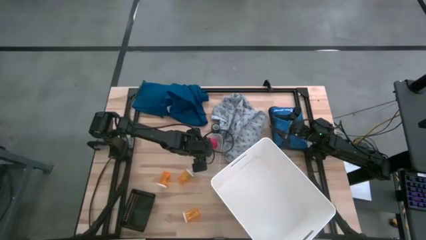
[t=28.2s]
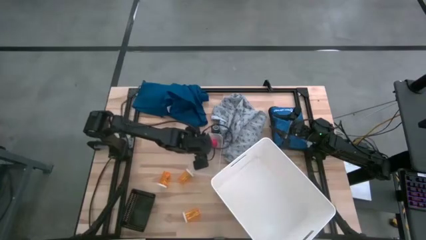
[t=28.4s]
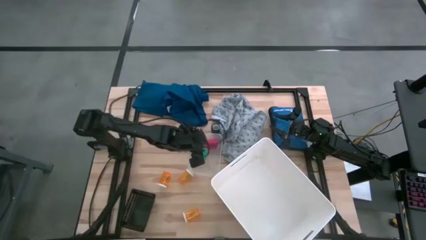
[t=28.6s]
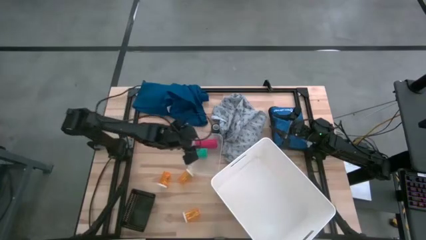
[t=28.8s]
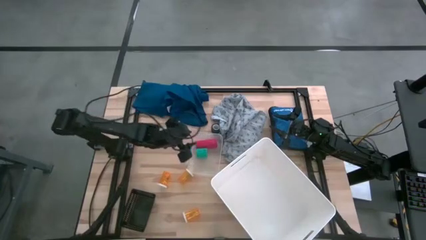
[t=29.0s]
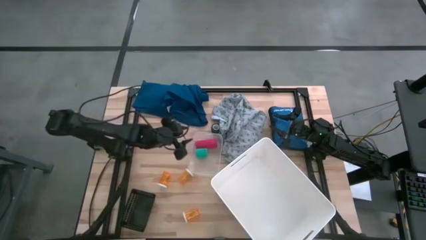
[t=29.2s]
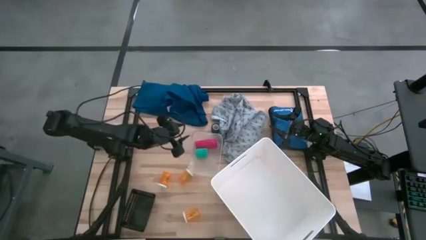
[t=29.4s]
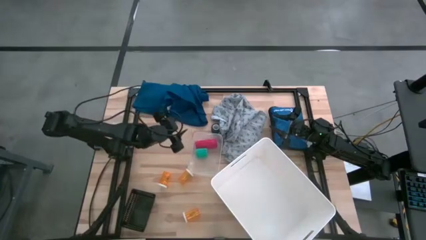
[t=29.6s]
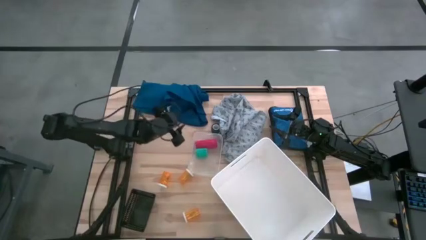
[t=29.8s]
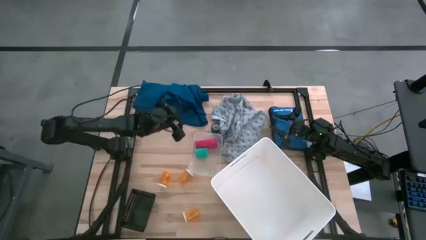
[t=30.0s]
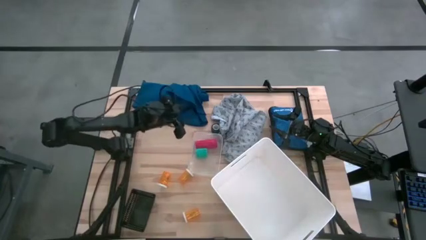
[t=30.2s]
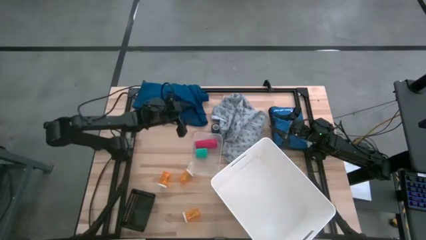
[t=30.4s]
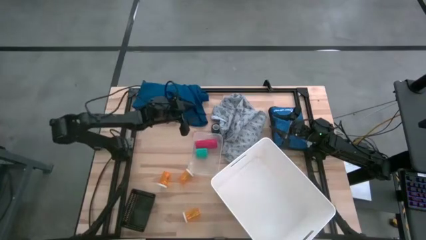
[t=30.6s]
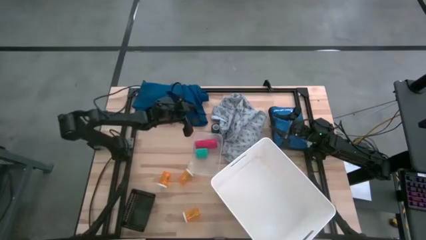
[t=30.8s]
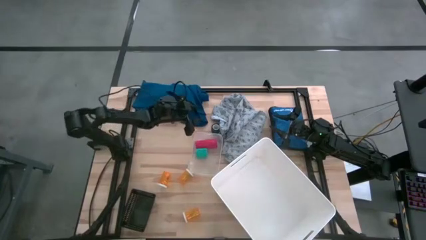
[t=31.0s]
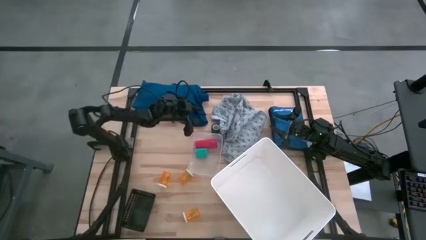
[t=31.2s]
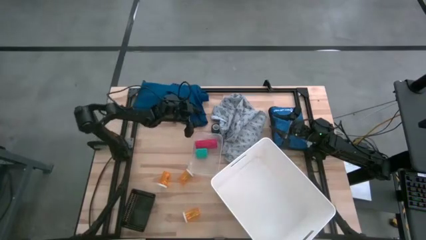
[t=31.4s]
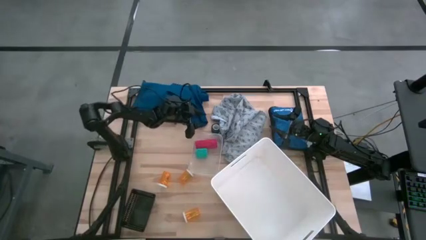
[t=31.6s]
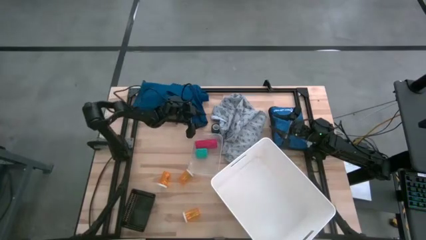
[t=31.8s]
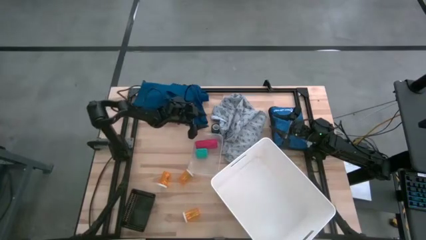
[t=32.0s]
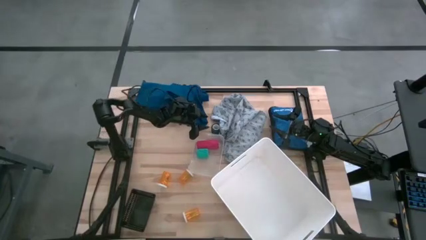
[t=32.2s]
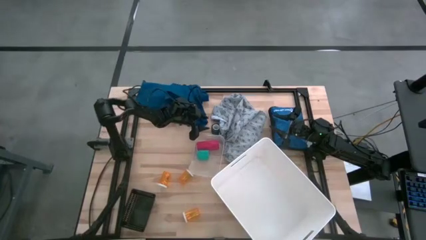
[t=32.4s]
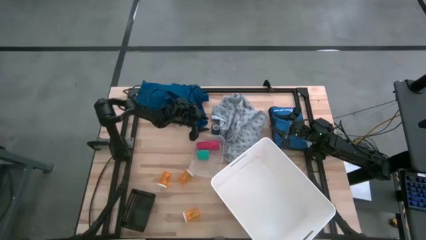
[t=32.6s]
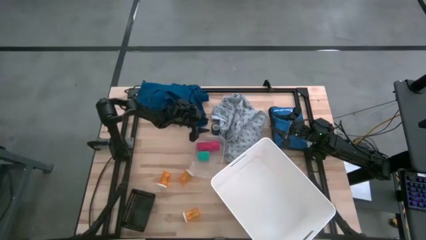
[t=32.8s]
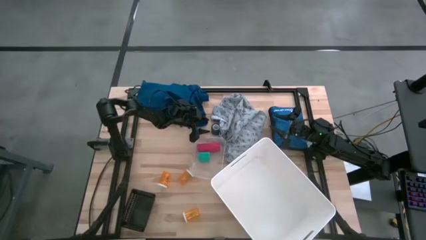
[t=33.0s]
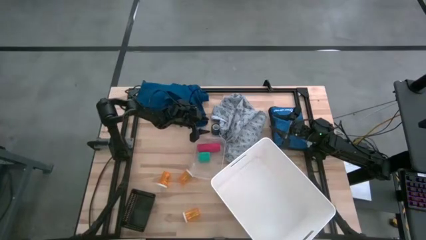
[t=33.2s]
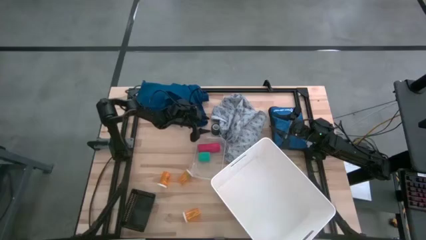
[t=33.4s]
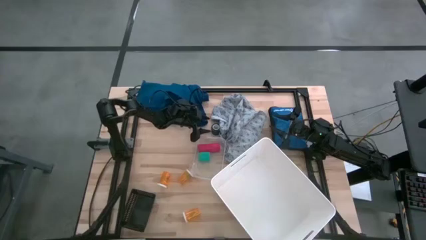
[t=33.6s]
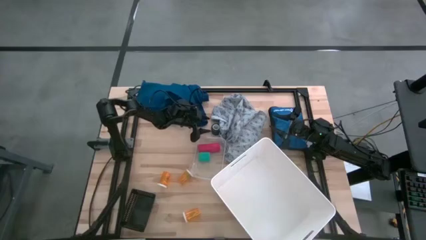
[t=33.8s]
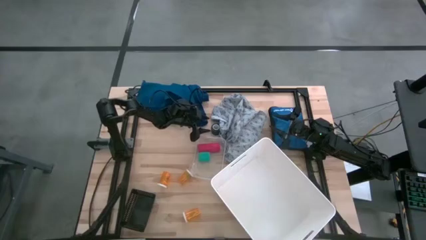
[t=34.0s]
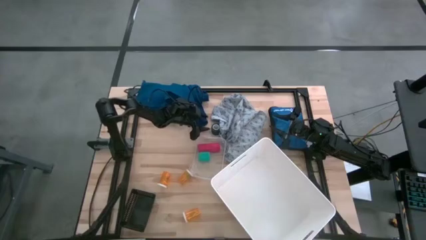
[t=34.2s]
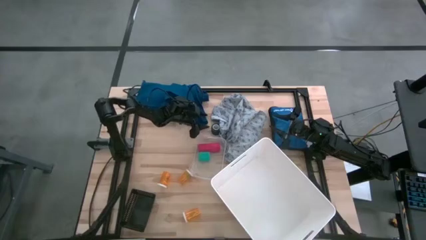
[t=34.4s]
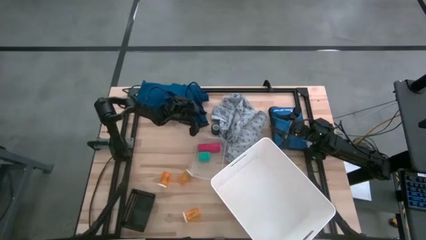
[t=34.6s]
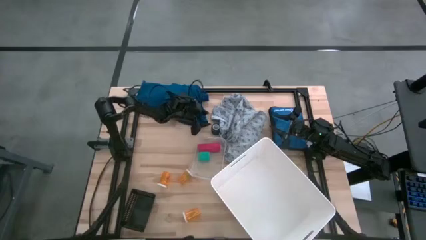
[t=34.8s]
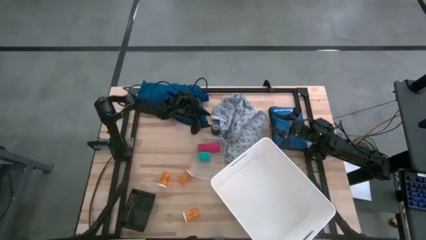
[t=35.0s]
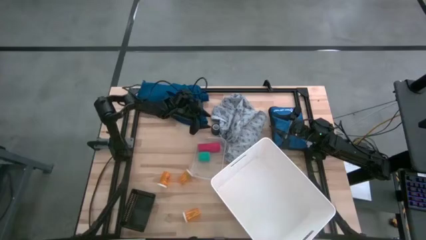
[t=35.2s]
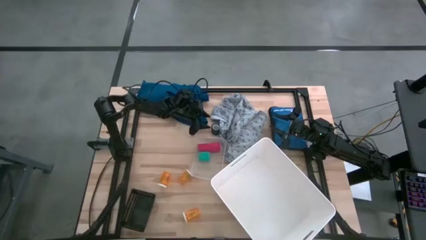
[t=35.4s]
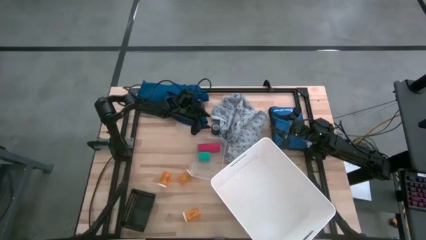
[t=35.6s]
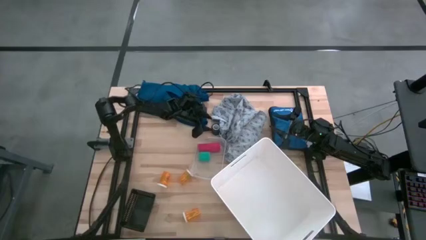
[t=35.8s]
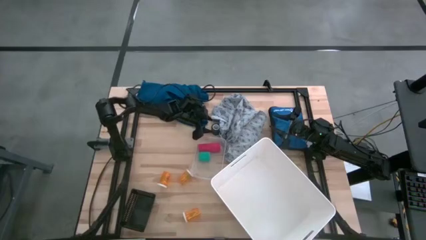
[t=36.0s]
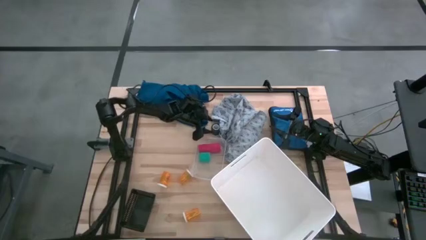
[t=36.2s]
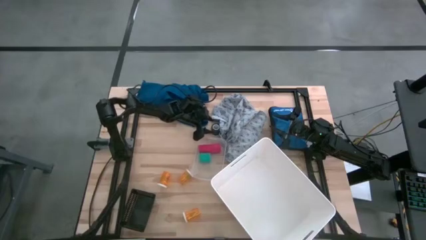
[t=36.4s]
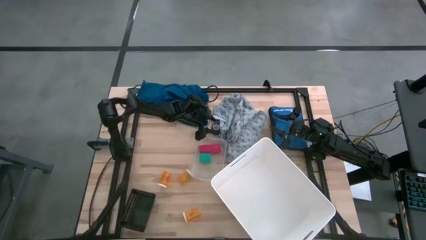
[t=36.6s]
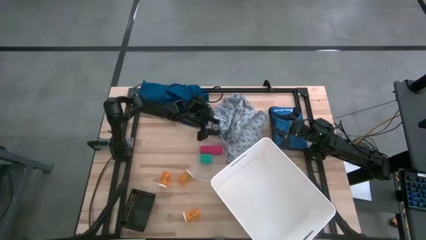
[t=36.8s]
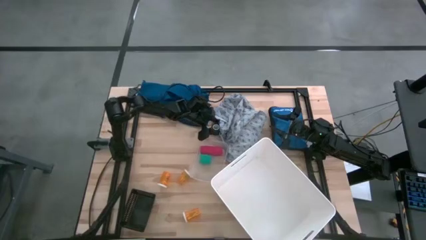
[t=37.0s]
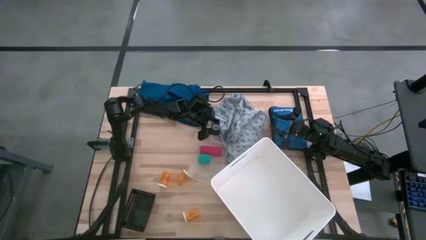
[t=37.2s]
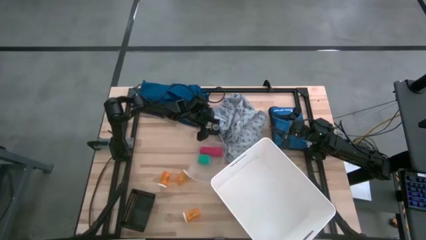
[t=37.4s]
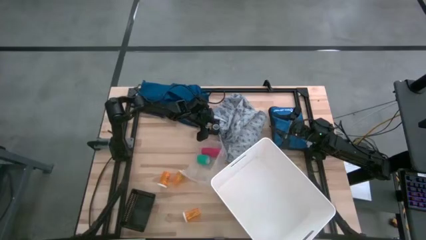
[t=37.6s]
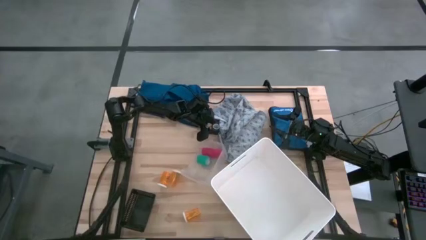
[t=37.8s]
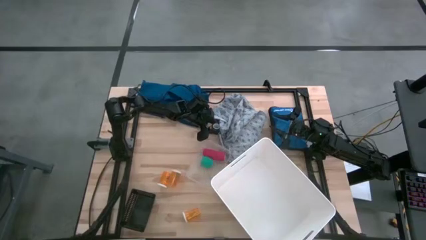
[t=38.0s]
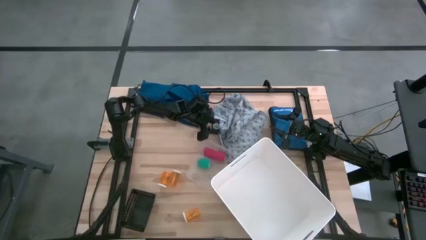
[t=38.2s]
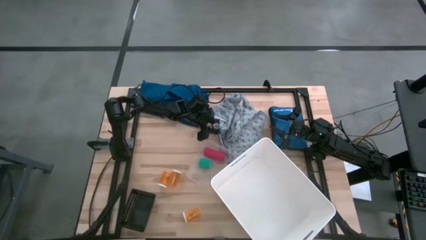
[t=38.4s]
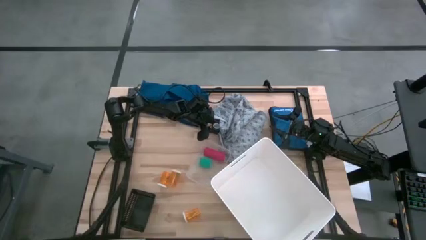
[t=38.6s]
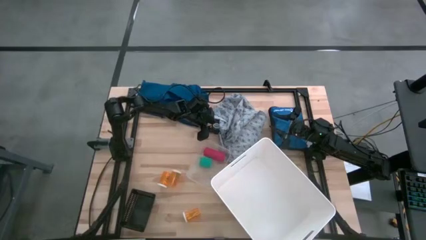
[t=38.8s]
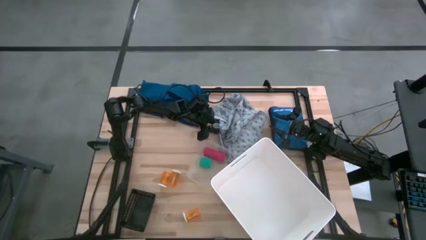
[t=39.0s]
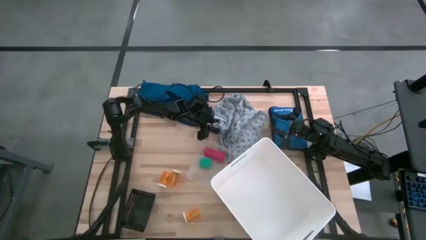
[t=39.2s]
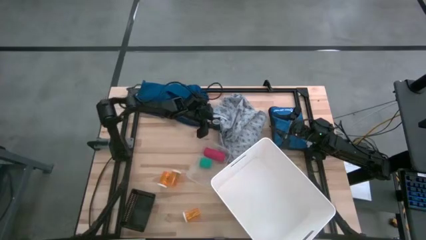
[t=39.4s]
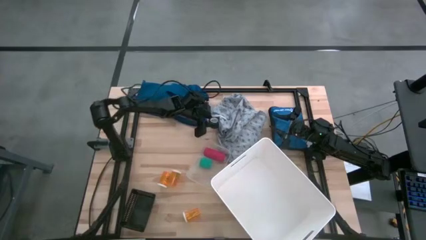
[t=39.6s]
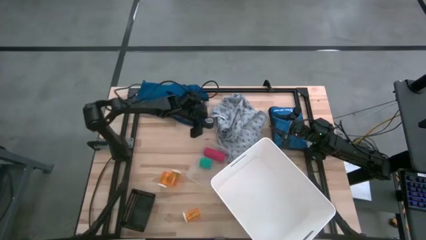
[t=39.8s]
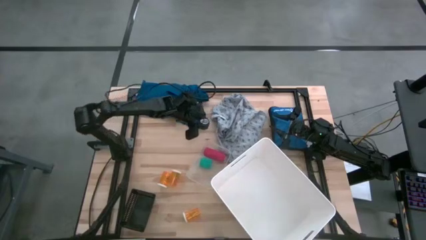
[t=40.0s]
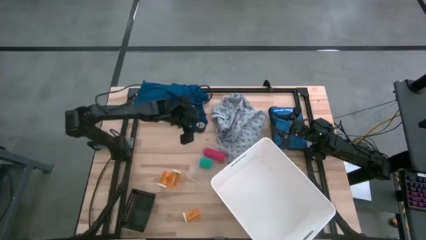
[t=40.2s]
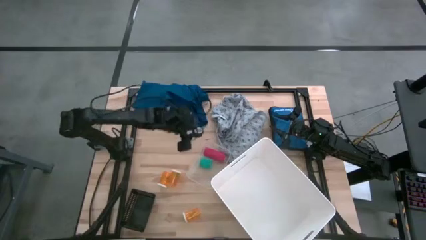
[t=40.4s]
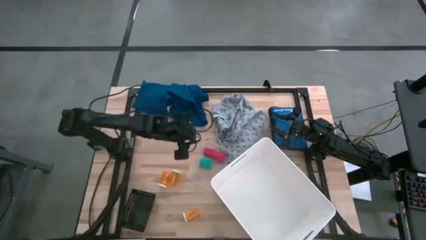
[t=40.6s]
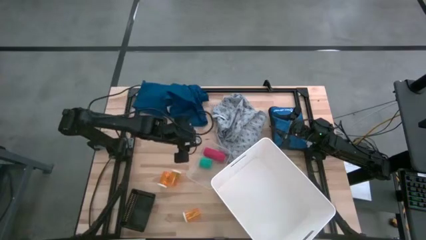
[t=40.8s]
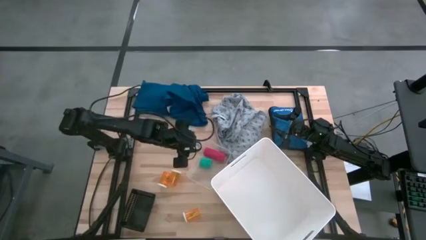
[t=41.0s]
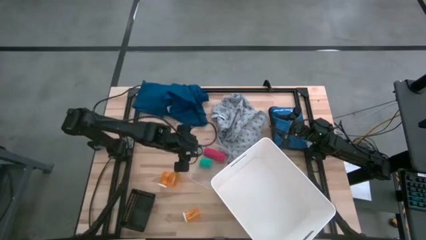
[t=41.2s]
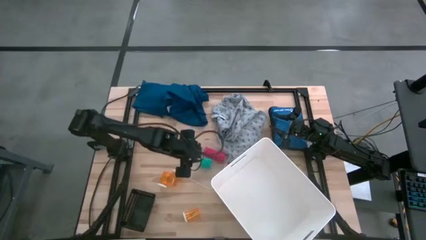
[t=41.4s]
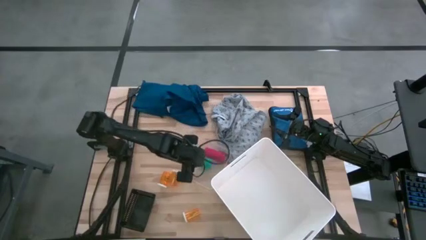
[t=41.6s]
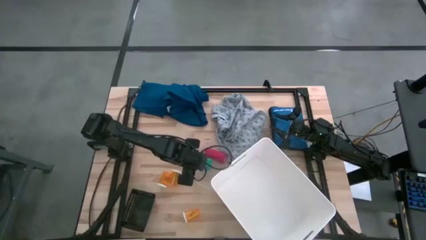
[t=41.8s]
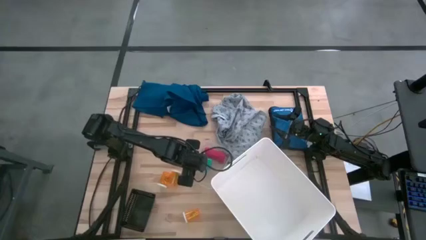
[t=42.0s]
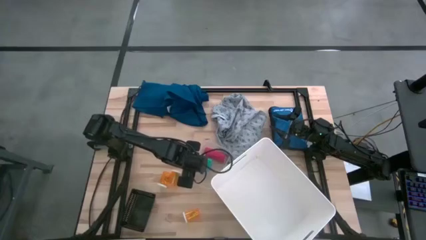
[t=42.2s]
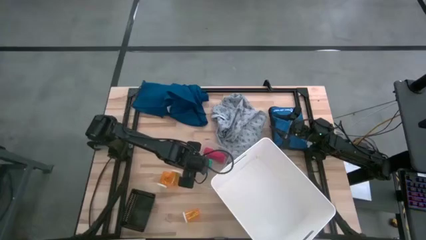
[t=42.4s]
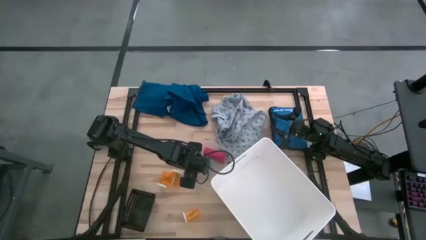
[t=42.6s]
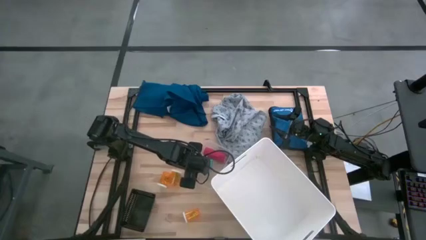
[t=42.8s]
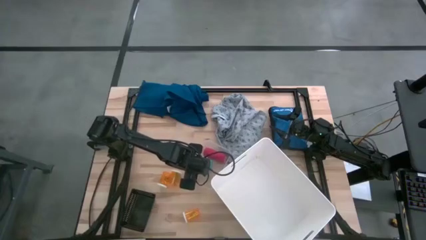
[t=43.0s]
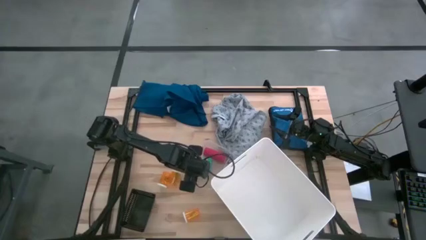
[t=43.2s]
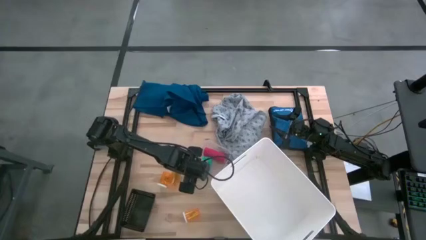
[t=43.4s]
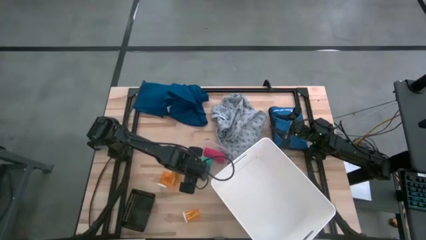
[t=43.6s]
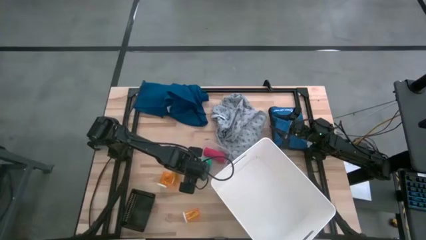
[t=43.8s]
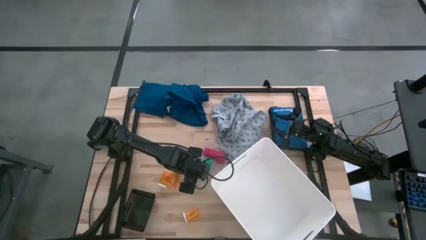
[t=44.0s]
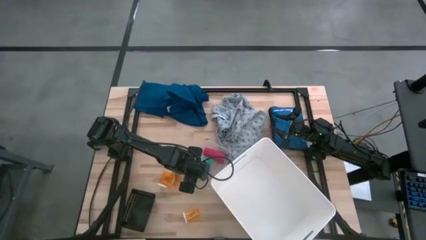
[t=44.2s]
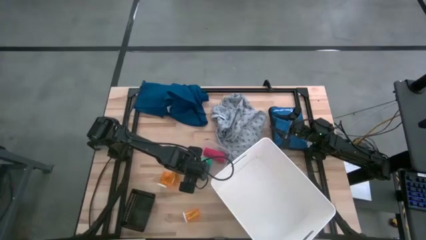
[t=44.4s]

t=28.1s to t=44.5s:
Task: Pick & Place Medicine items
Put the green bandage into the transparent bin
